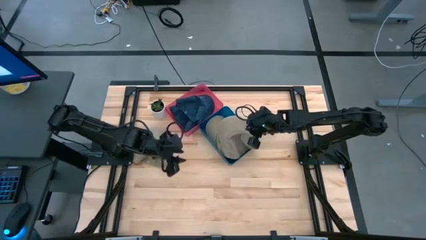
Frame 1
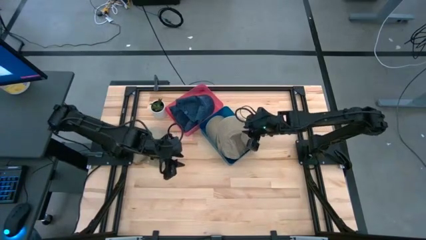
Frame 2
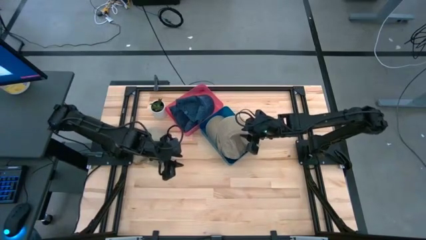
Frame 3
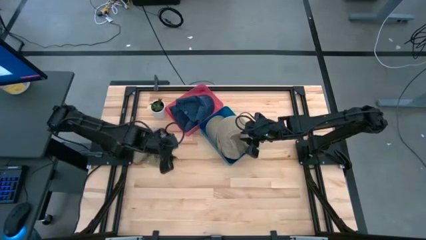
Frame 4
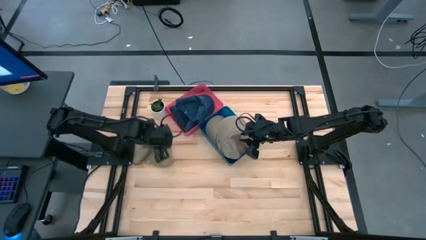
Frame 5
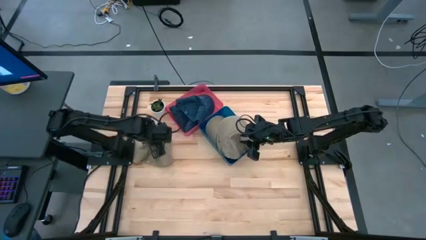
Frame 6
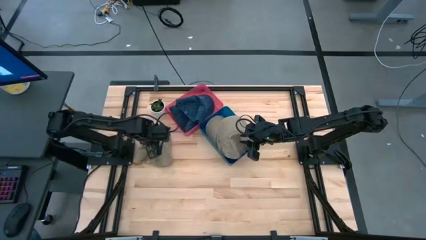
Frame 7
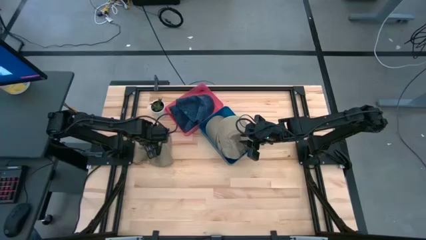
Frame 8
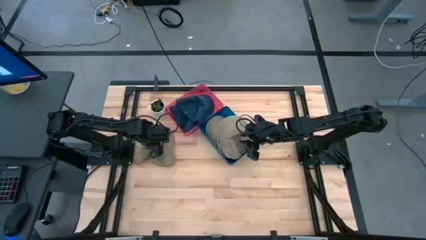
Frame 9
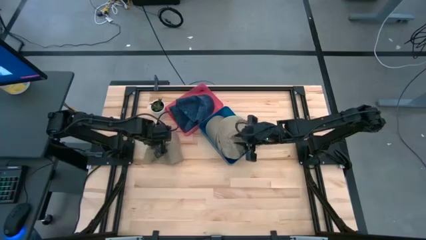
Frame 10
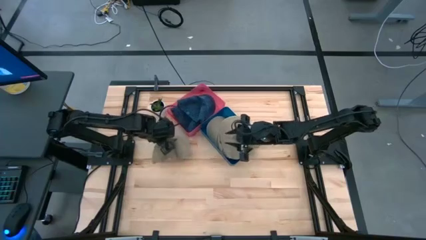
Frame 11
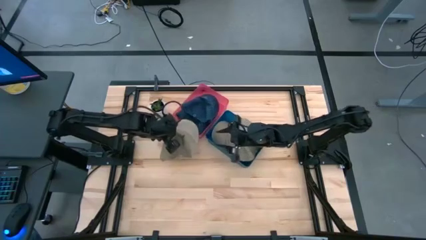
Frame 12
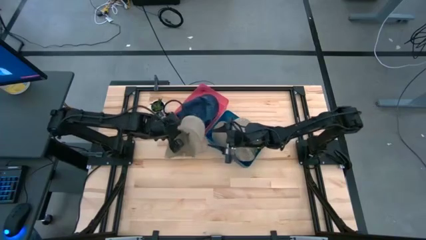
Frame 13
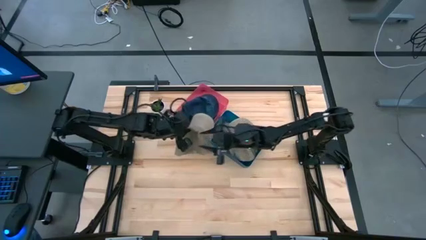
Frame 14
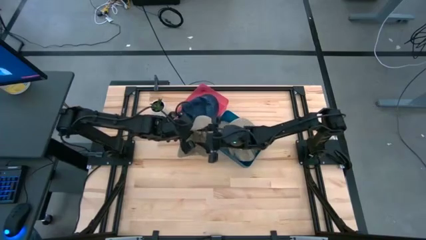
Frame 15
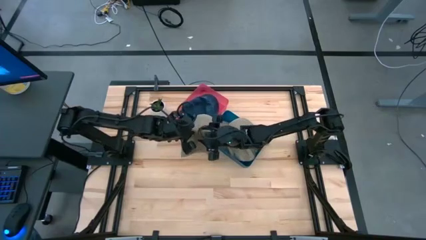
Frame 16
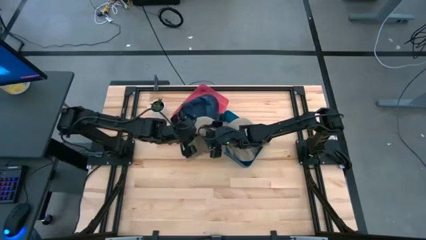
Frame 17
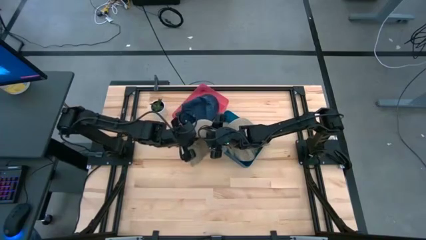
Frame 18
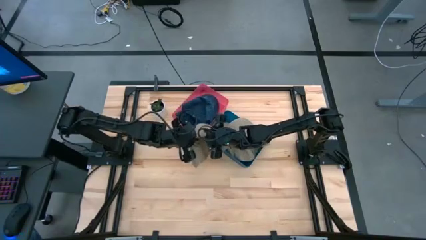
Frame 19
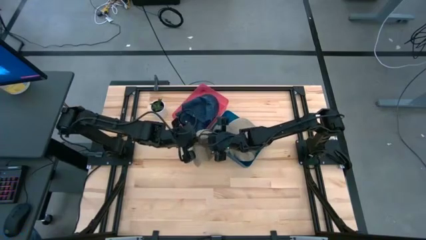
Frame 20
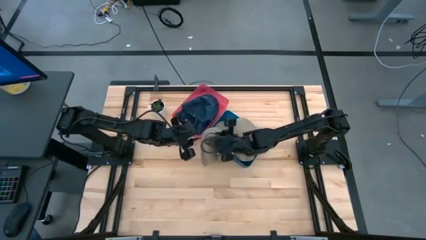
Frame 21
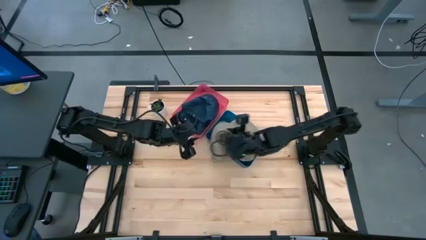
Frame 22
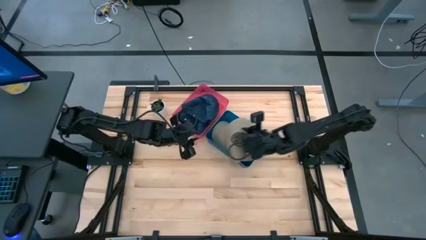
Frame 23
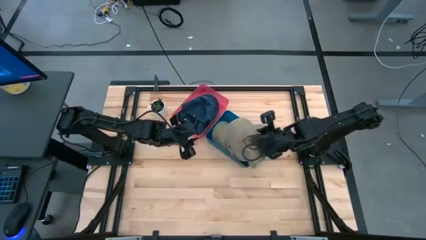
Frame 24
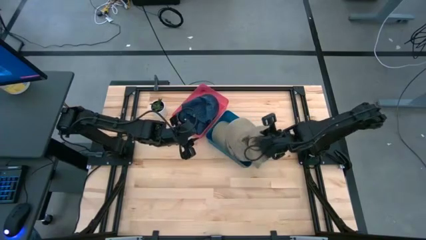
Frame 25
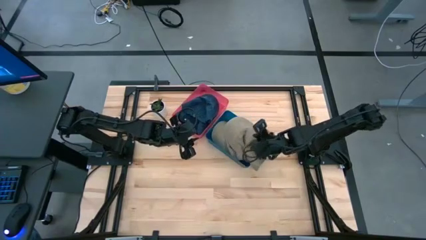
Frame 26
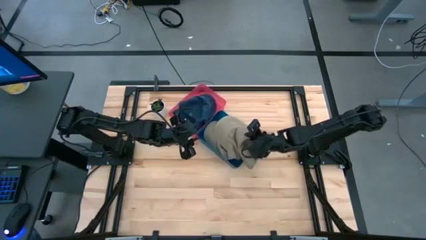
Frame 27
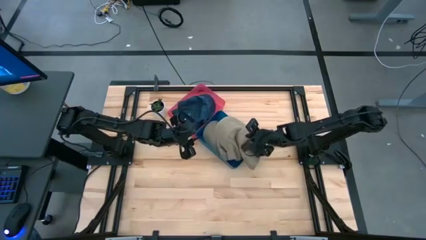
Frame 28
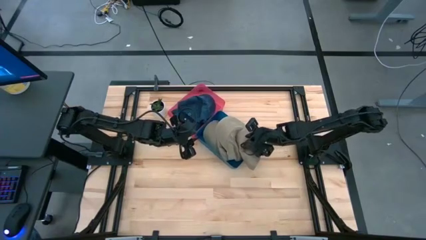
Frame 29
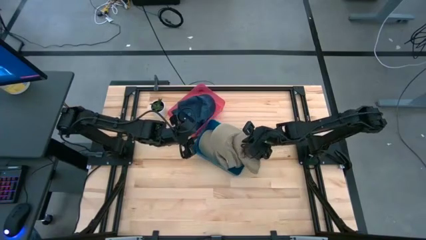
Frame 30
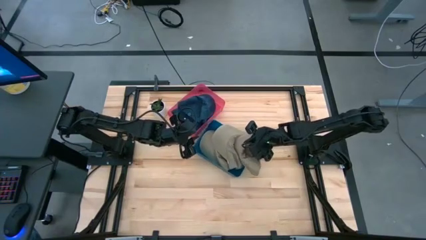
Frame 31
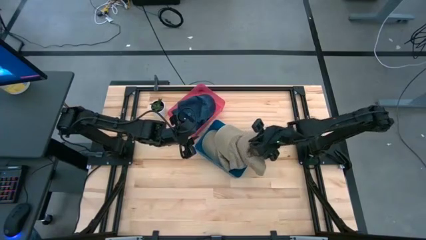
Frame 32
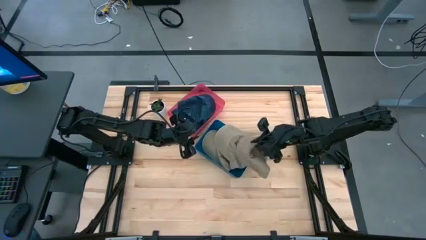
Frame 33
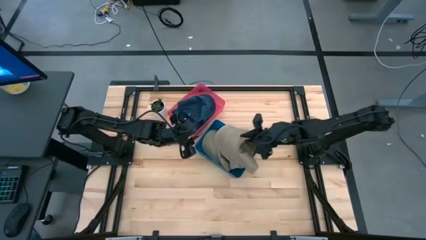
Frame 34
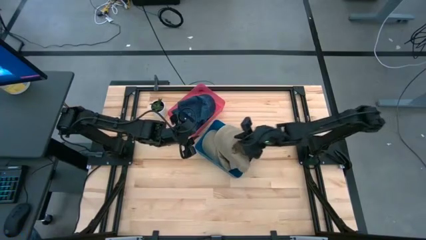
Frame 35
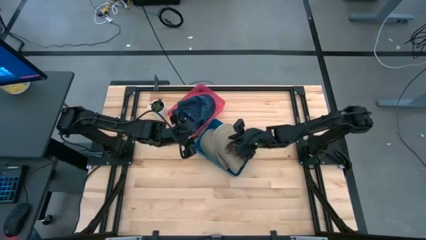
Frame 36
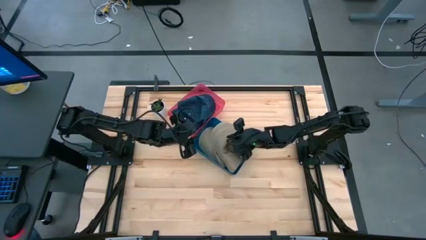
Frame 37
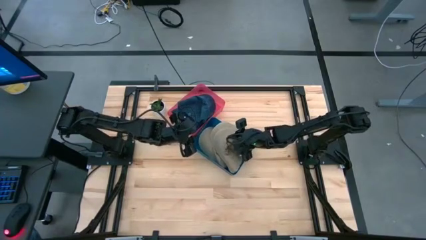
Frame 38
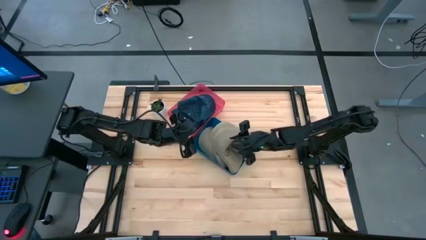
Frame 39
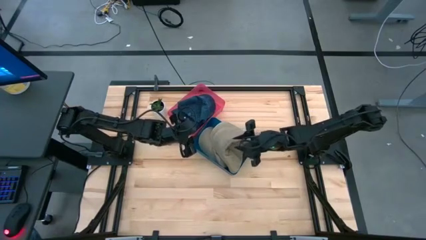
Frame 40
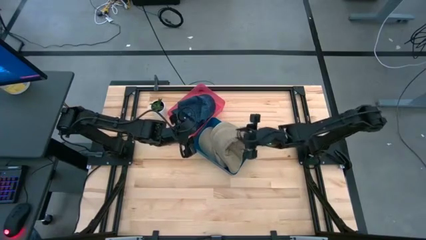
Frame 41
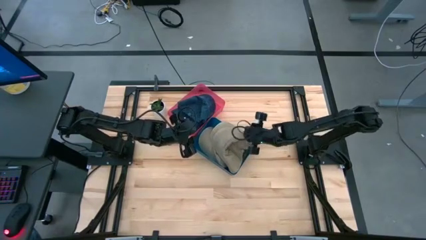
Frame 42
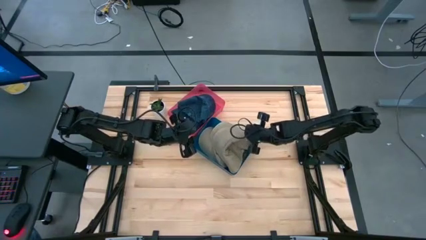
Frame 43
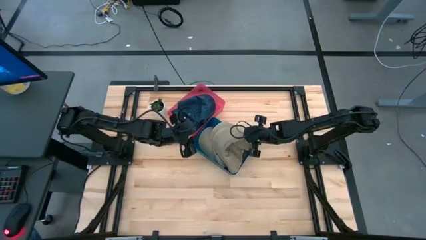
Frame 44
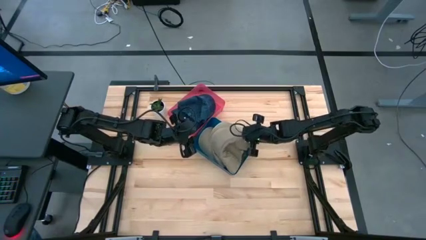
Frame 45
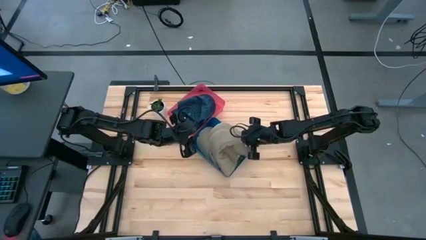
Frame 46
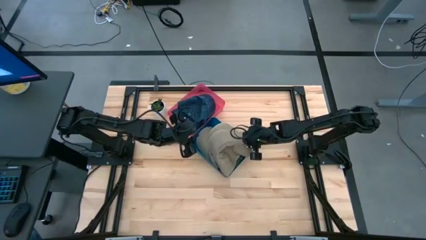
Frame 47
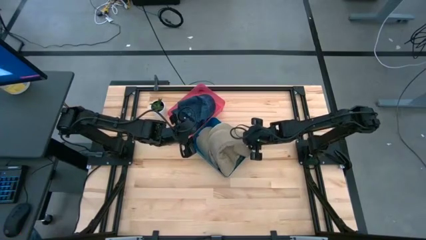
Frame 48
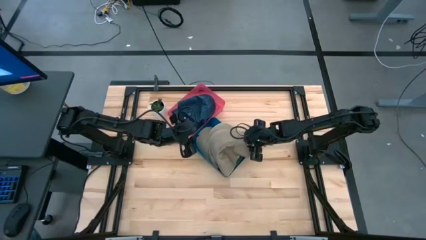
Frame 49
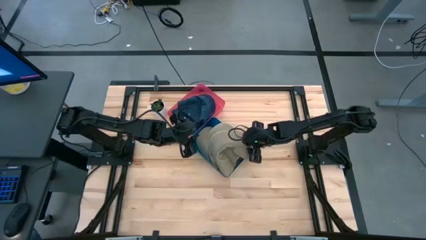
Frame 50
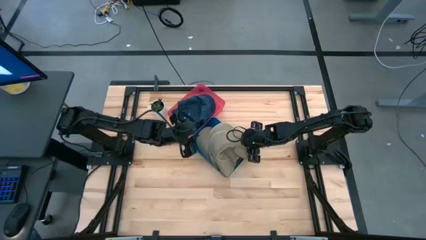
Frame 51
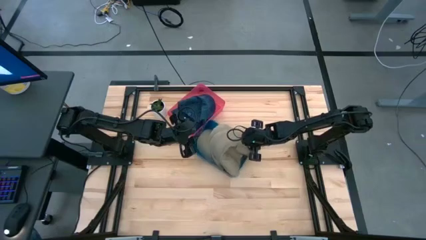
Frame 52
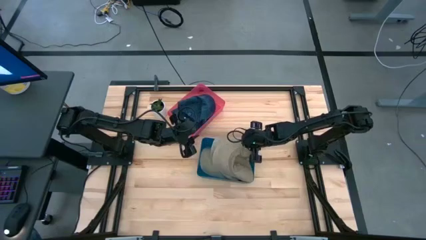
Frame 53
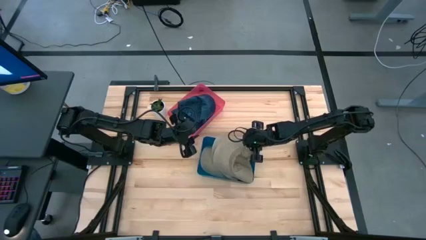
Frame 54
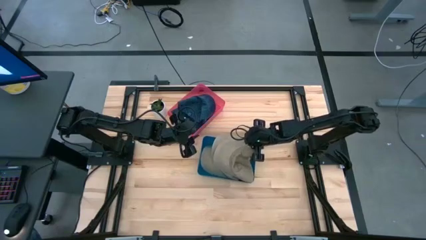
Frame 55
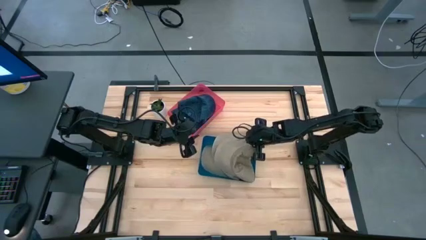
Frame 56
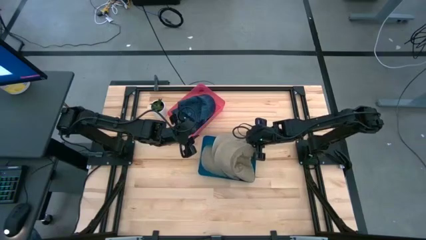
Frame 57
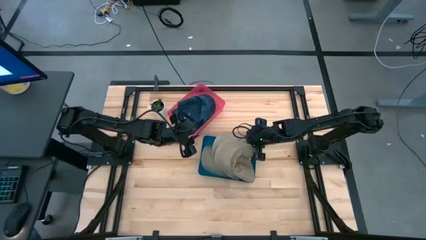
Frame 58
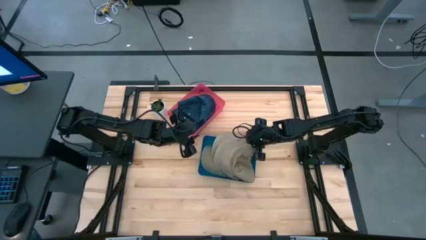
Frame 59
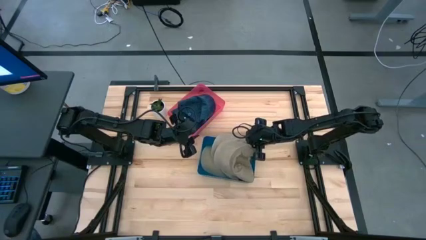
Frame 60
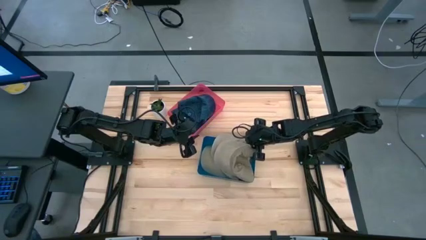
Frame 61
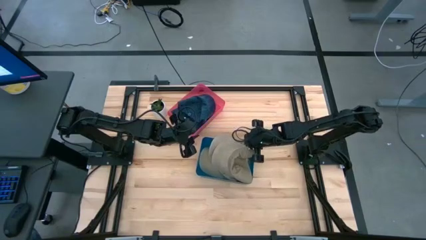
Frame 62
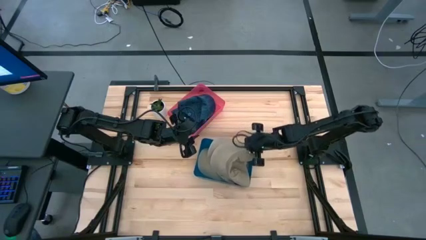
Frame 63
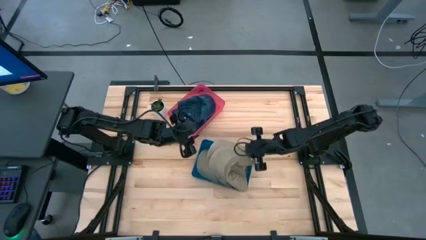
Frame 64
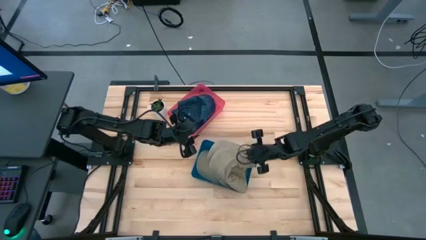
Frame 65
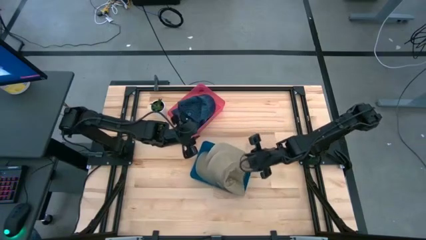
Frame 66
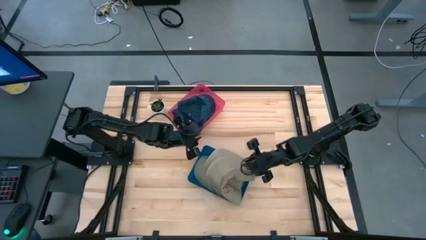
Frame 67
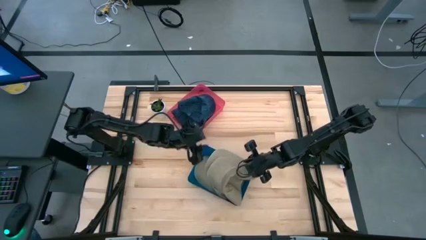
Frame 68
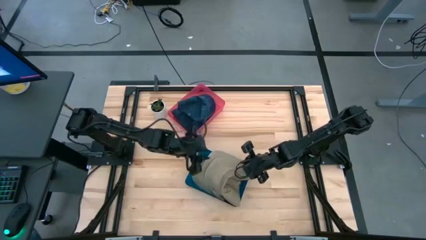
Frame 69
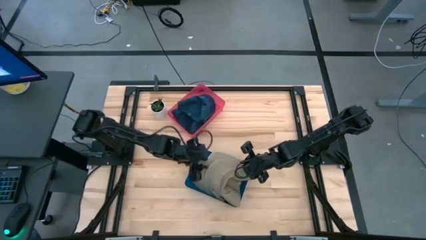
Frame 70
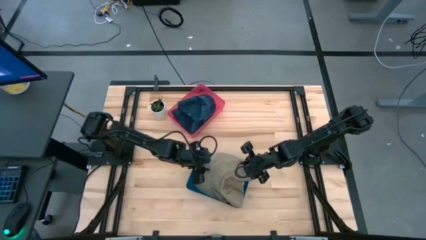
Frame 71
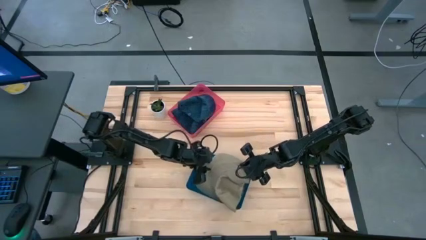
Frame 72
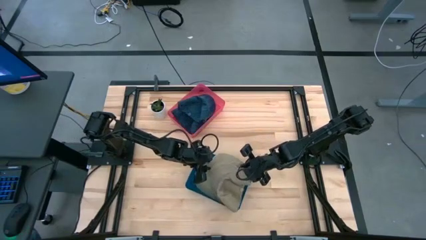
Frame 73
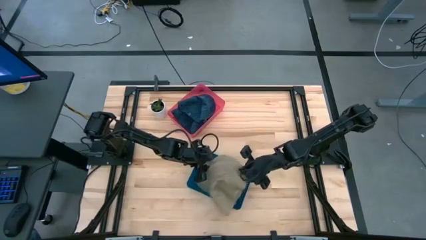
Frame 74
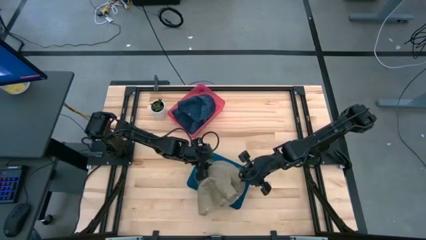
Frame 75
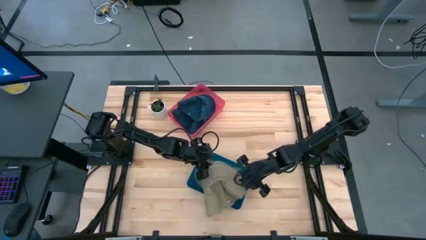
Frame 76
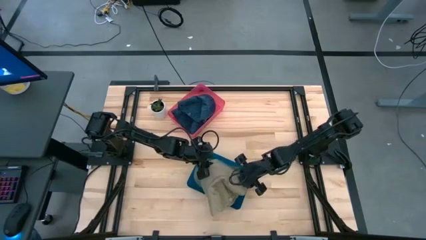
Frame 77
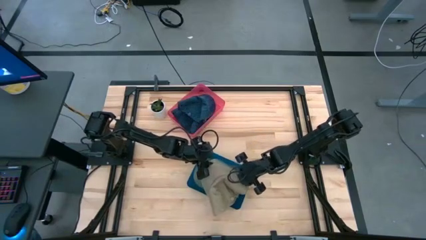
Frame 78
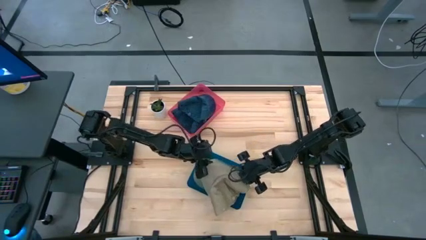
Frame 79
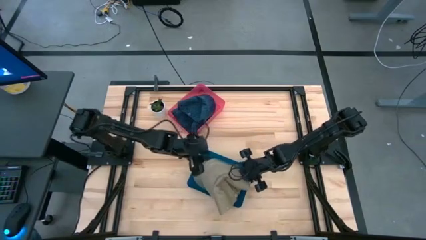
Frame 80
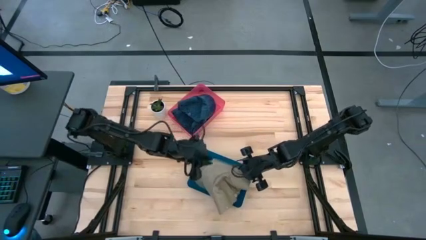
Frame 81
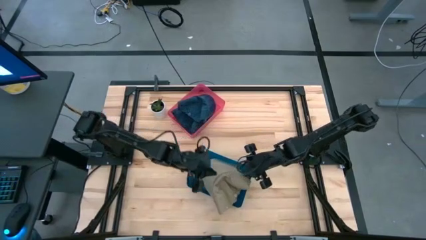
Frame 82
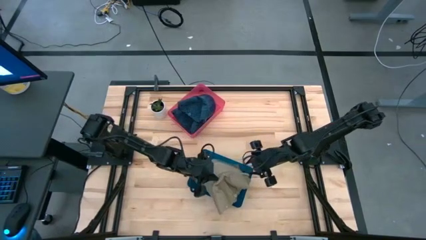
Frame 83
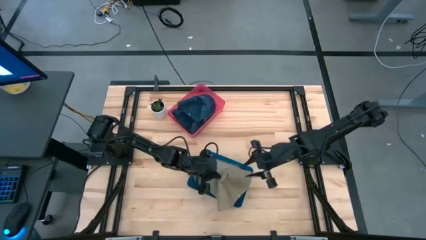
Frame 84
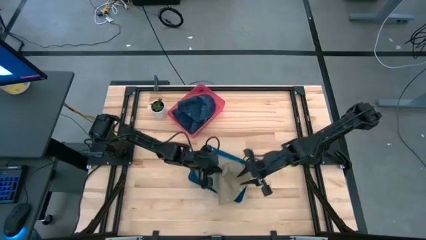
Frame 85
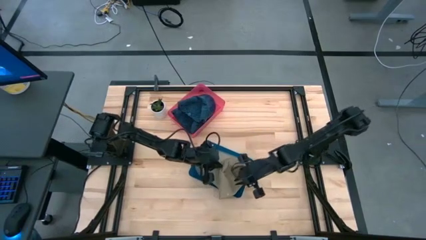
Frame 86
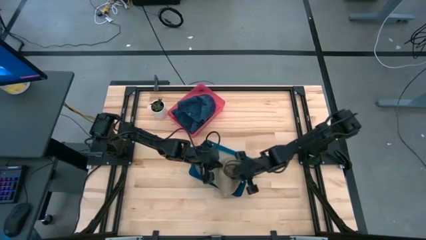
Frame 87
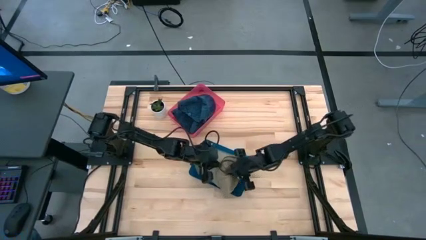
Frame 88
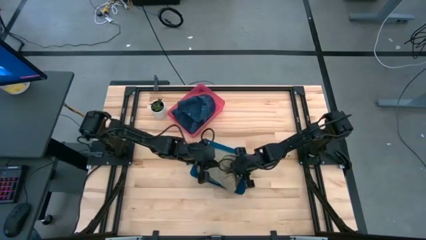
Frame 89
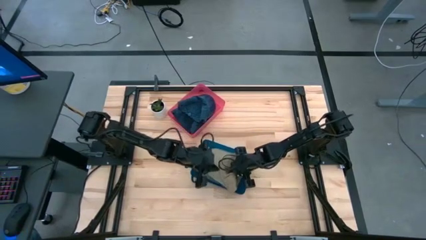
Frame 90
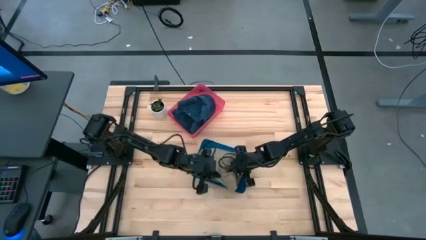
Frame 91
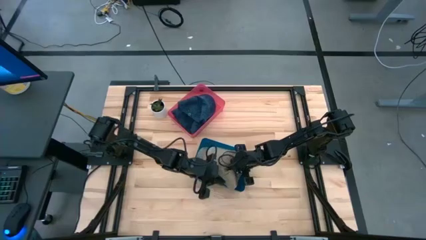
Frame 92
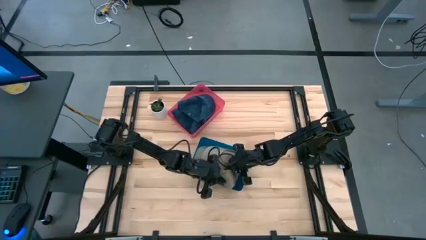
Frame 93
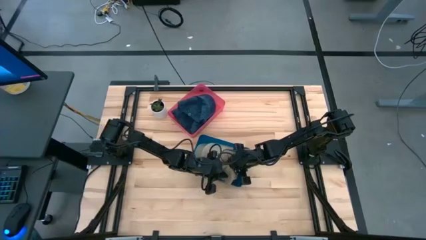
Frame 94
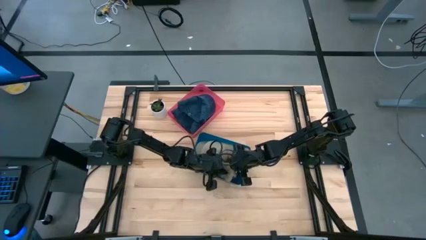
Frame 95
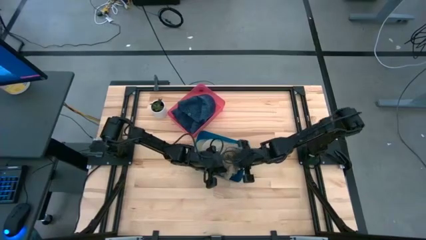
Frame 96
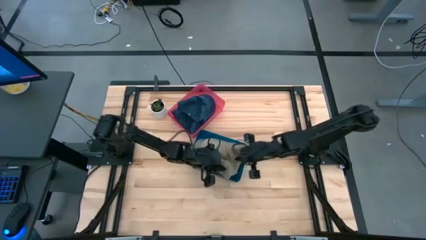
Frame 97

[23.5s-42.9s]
Task: Pick & Place hat
Put the brown cap into the blue bin
